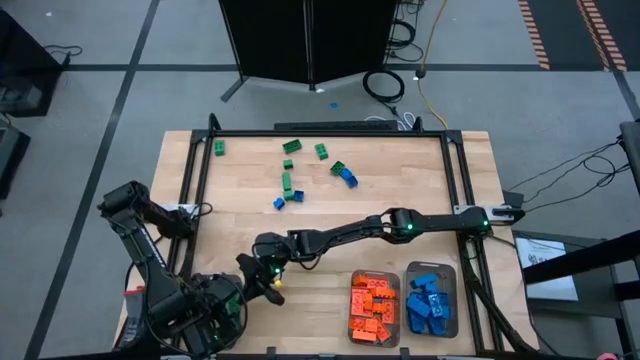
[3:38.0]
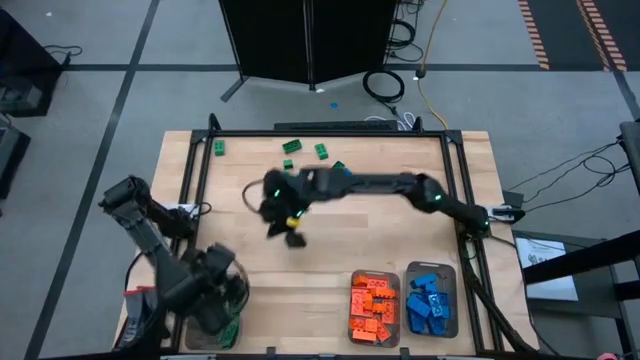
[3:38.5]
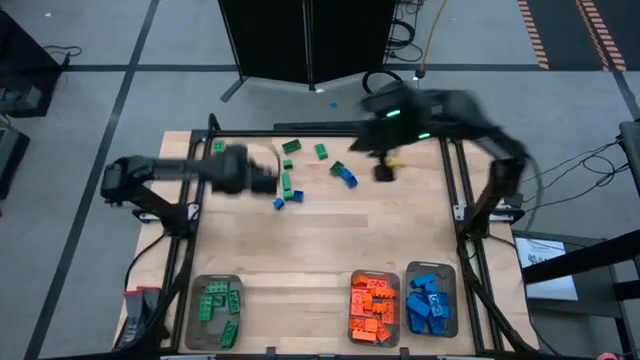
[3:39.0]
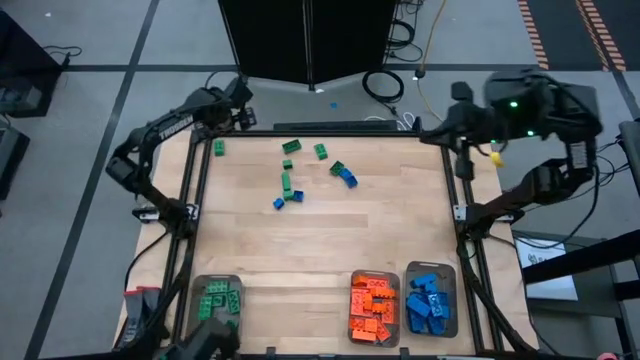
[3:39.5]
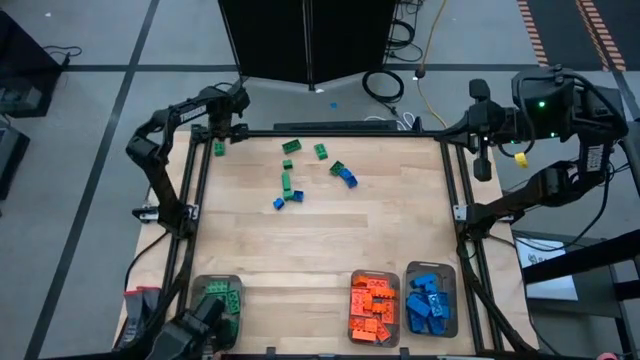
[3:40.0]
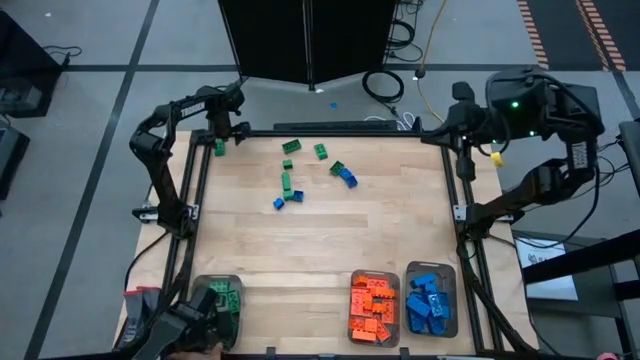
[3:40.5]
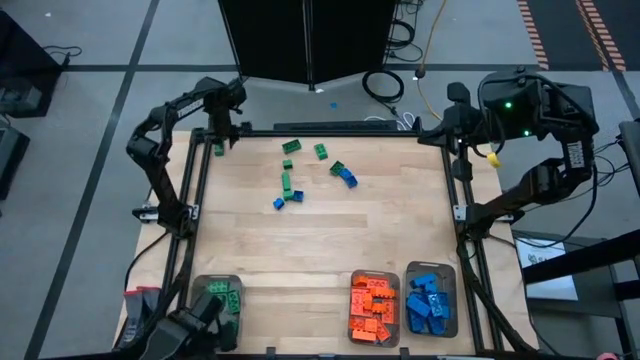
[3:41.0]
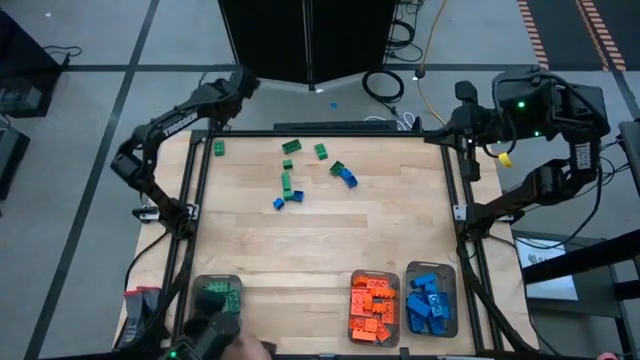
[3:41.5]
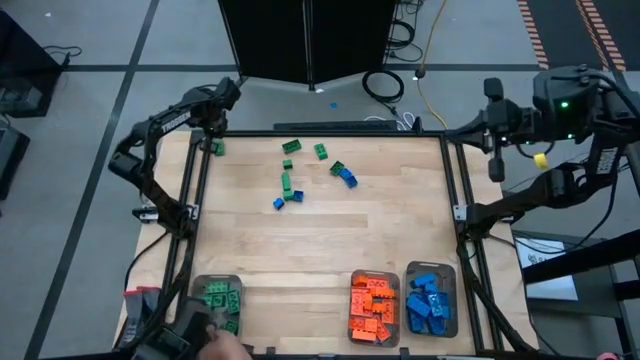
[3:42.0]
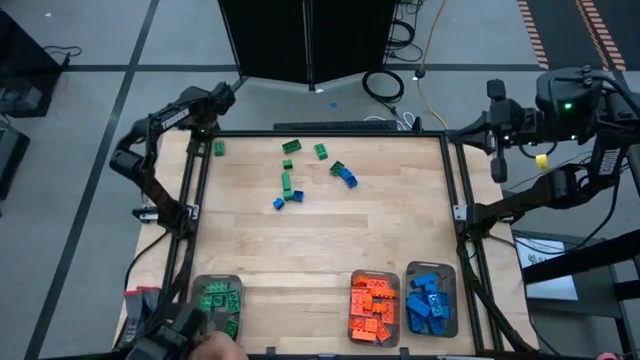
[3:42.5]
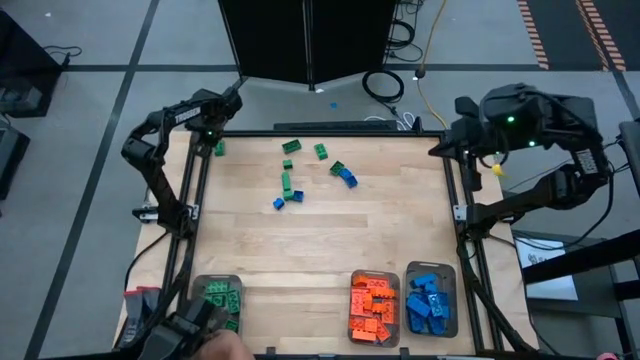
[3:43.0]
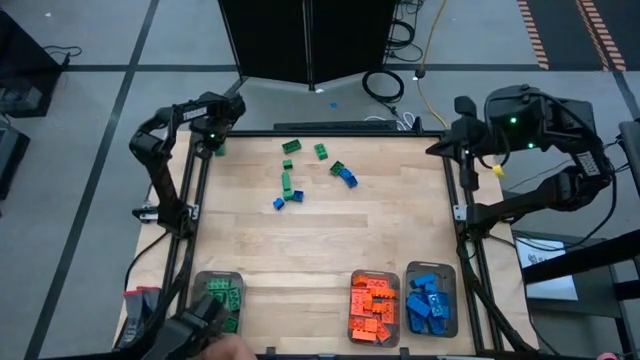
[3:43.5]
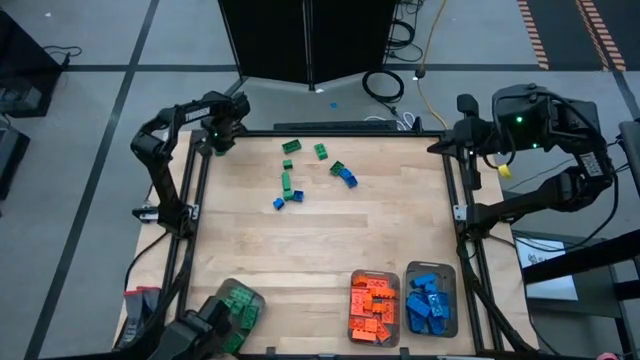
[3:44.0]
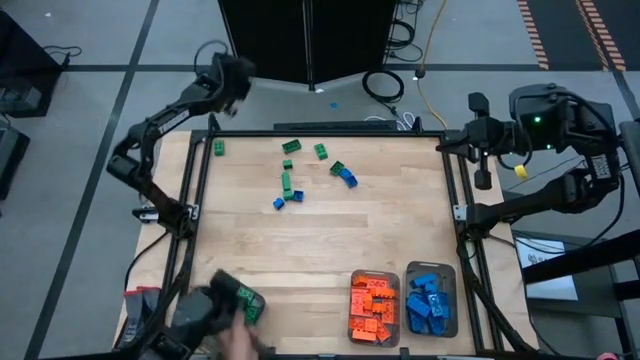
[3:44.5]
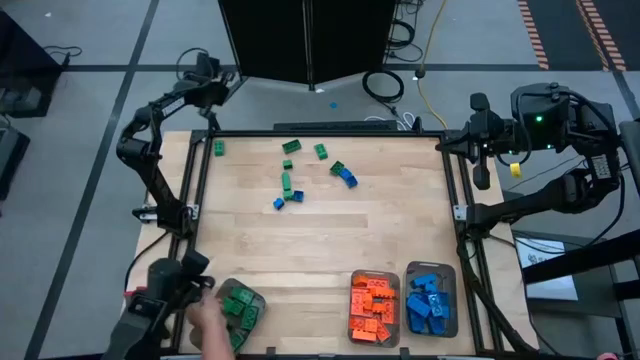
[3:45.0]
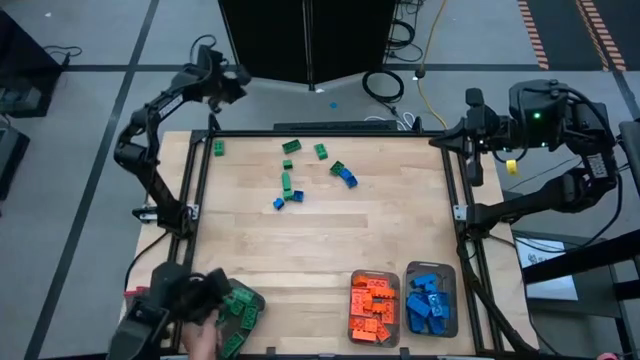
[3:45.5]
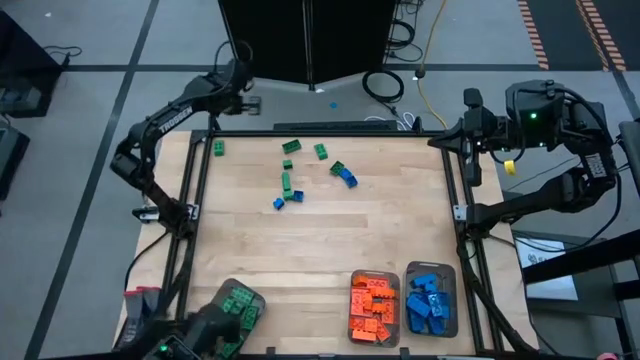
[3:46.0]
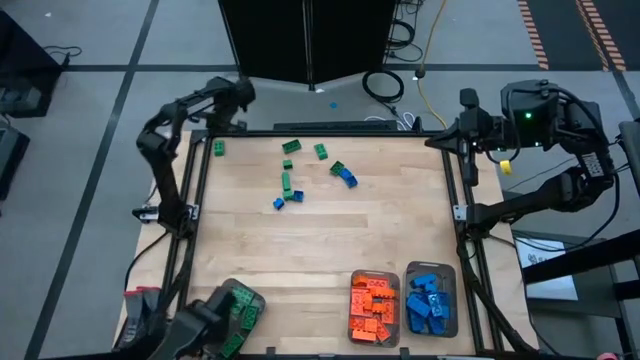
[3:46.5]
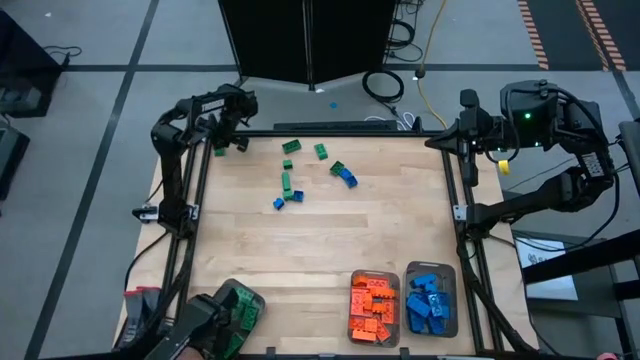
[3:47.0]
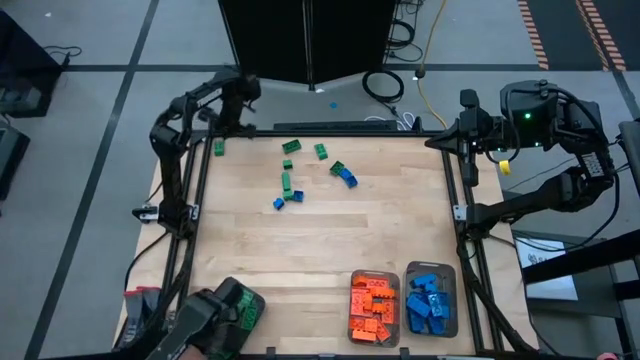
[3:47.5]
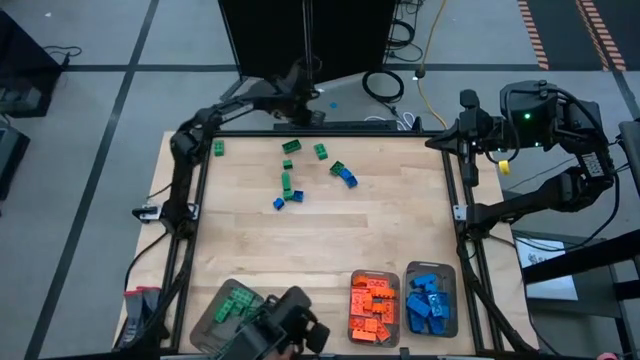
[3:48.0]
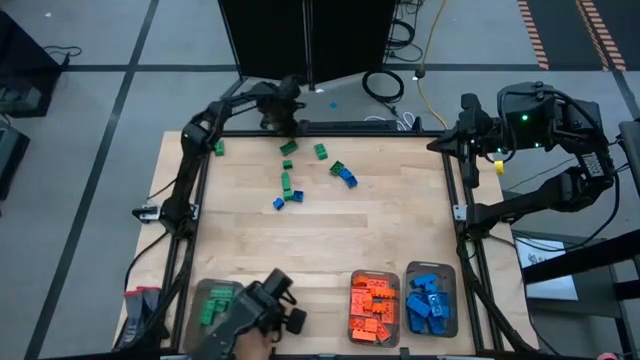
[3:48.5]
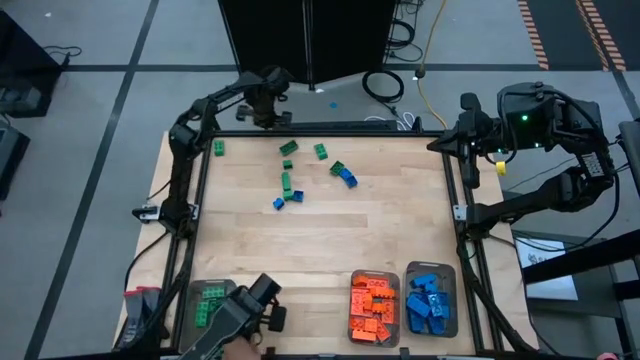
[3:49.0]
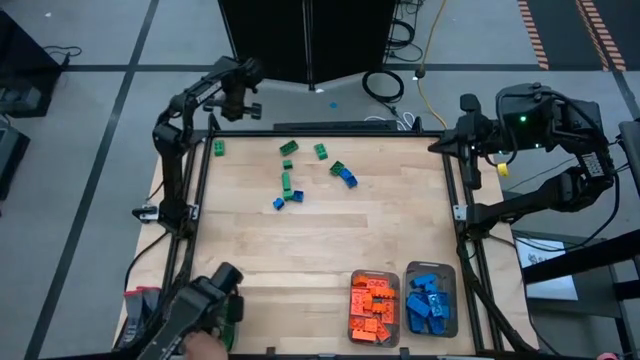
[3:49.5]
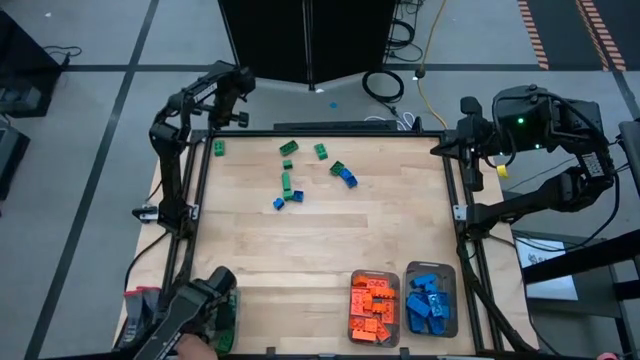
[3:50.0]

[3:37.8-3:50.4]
Task: Sort blocks
Move the green game piece to the center
